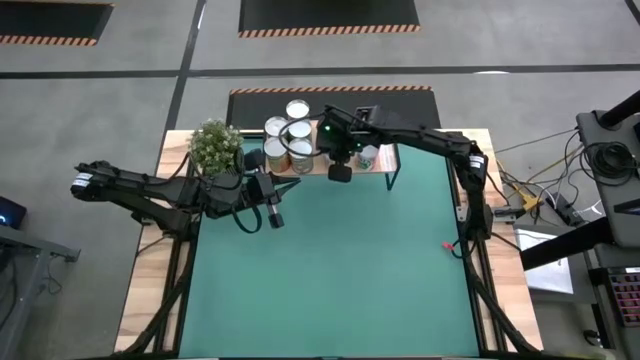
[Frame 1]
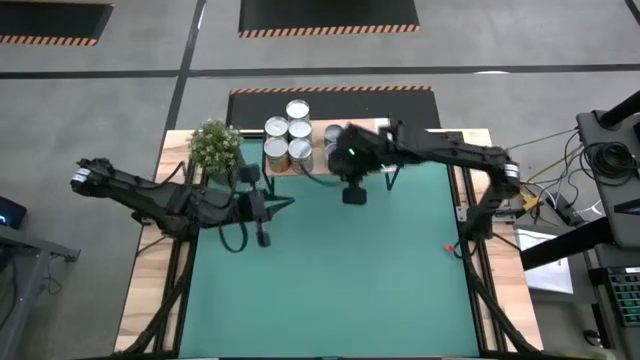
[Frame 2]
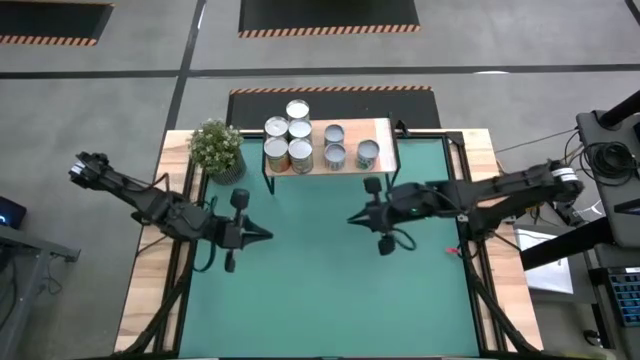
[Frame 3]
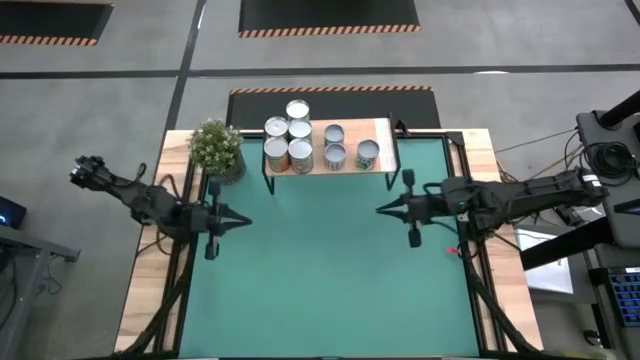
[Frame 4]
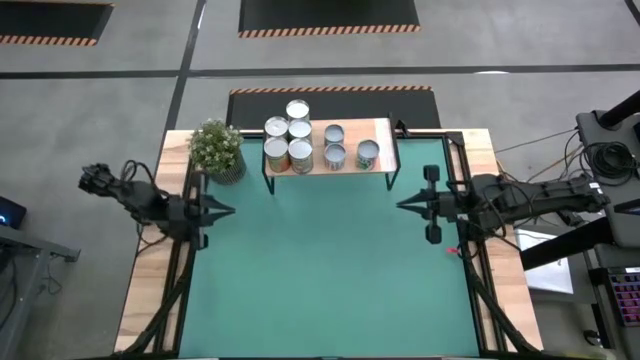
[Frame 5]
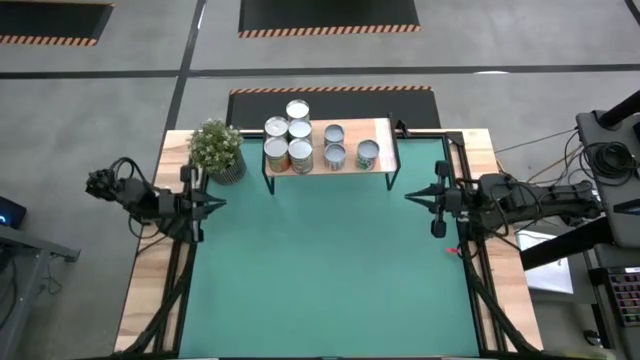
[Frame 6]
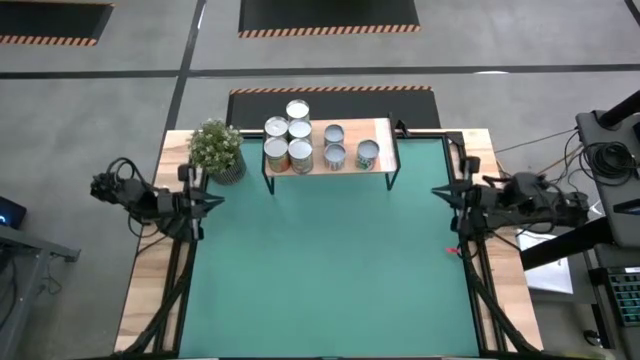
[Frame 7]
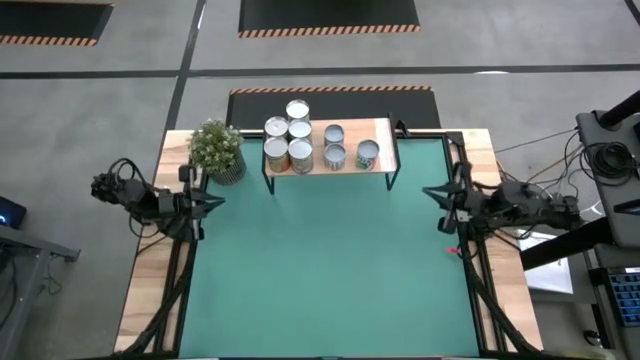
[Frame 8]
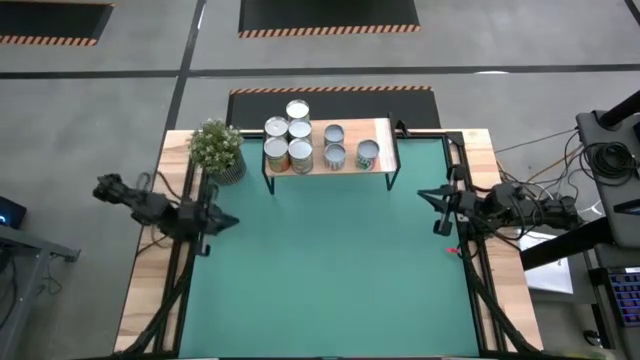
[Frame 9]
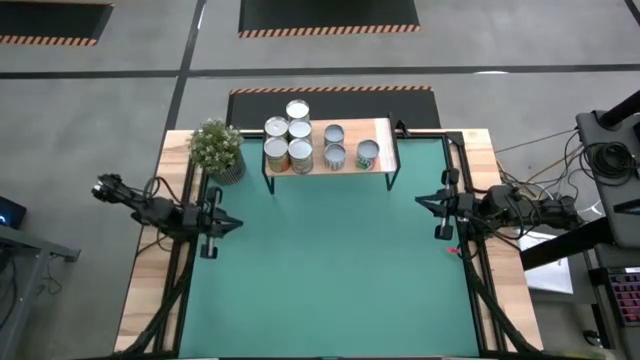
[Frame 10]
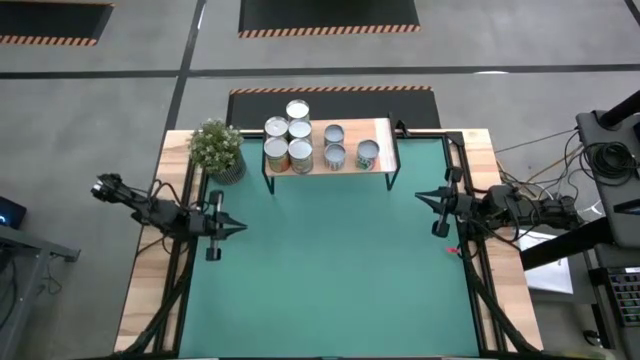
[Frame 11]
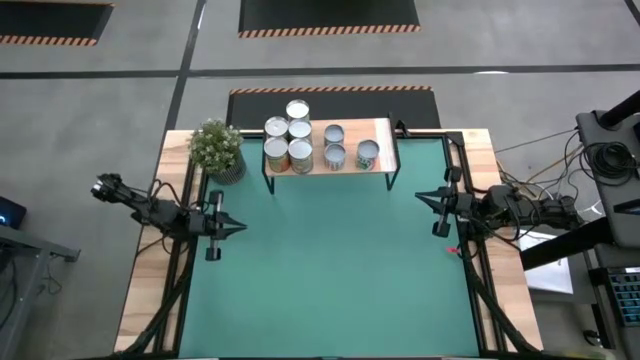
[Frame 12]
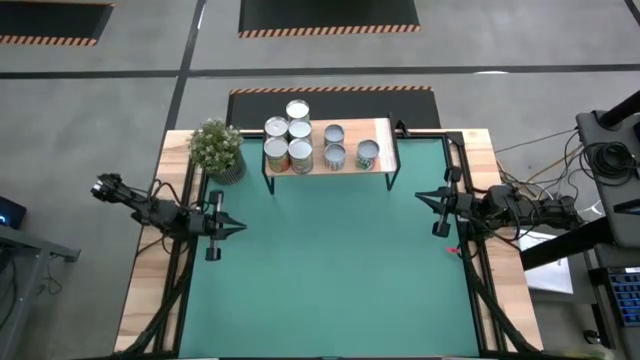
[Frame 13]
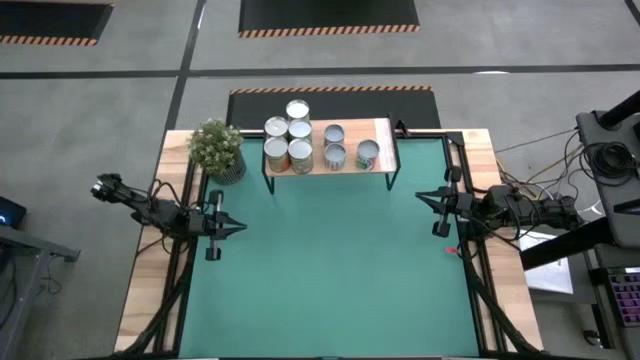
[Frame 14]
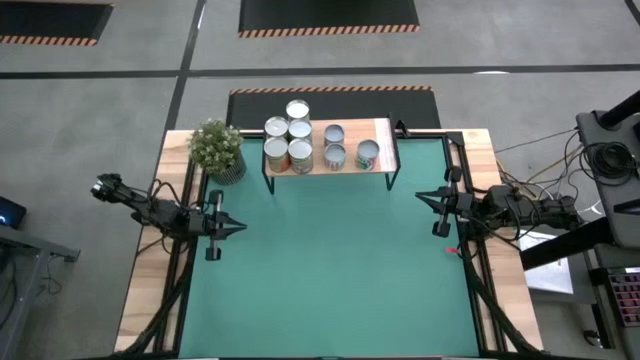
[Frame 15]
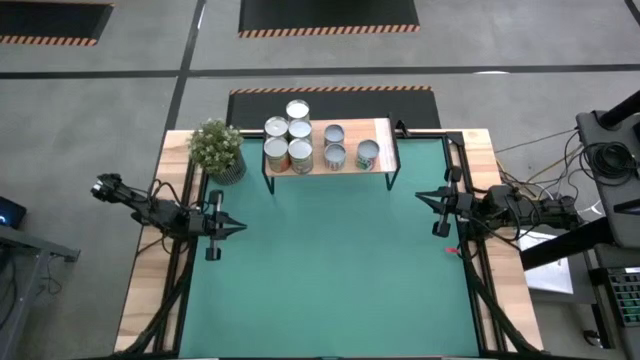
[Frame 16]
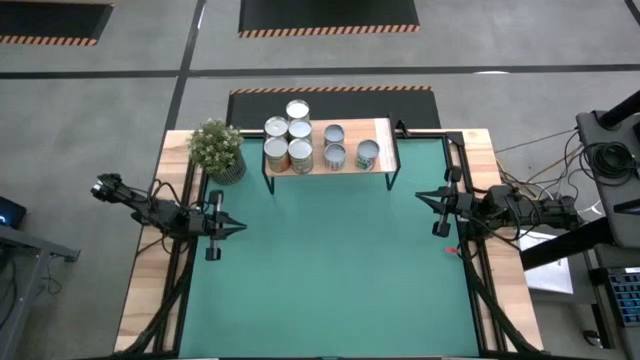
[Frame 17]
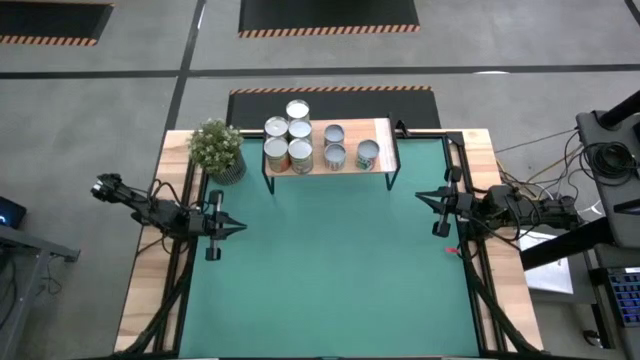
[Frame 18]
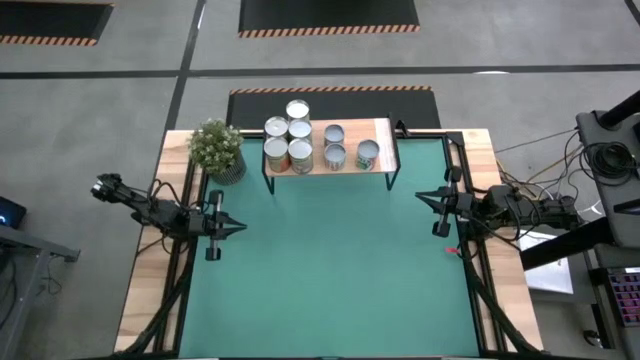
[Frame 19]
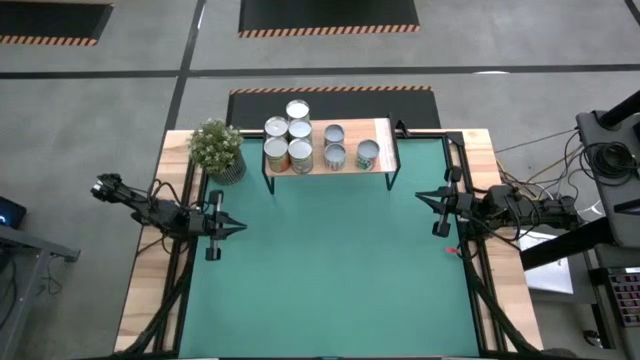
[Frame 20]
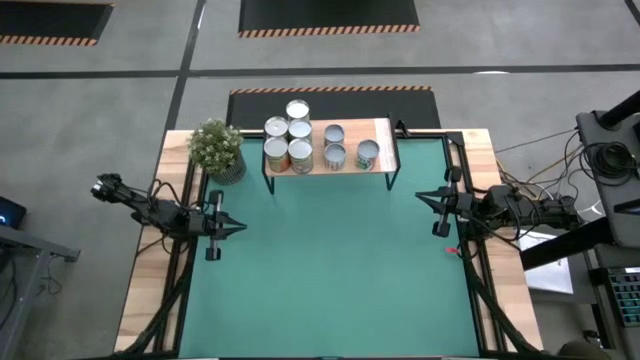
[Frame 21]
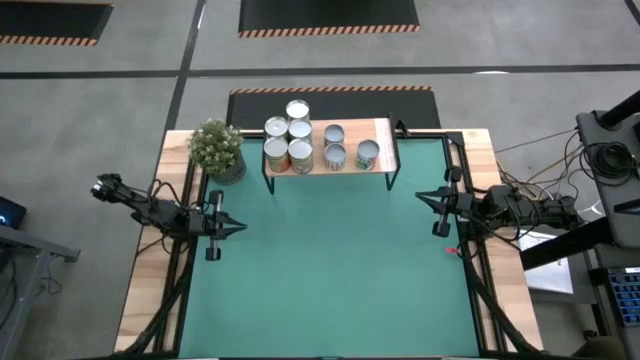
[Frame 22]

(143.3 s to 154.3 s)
Task: Pick and place cans onto a shelf
Return to Home Position

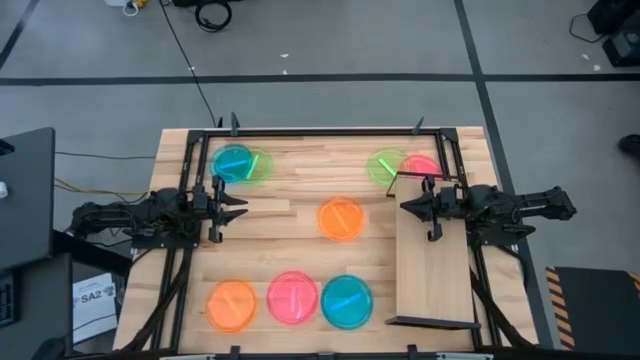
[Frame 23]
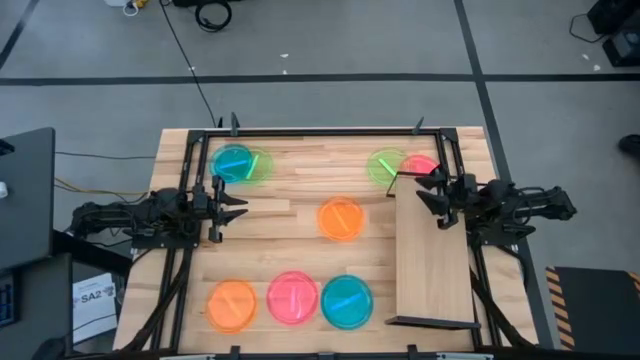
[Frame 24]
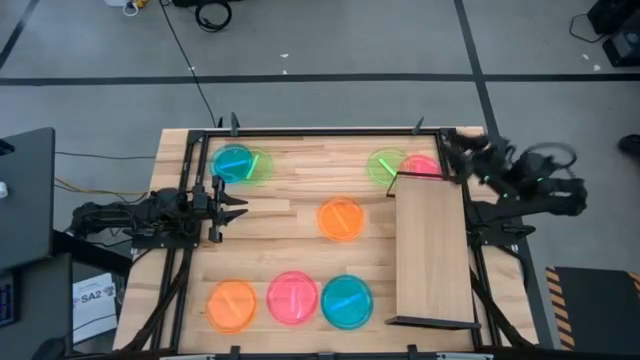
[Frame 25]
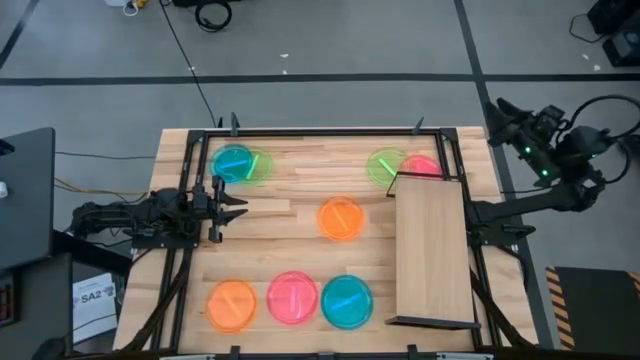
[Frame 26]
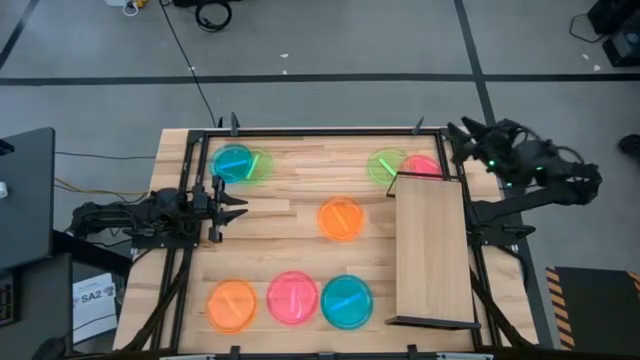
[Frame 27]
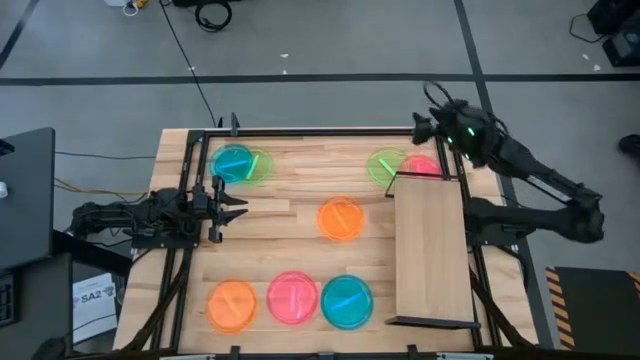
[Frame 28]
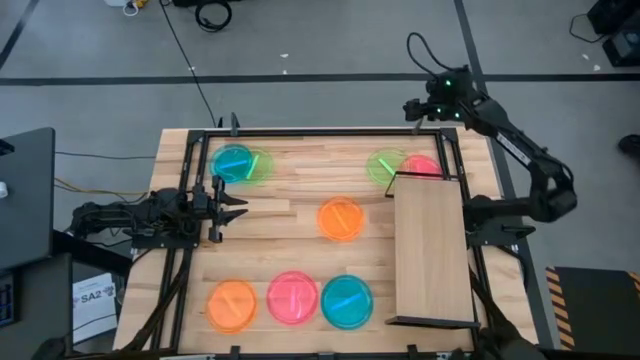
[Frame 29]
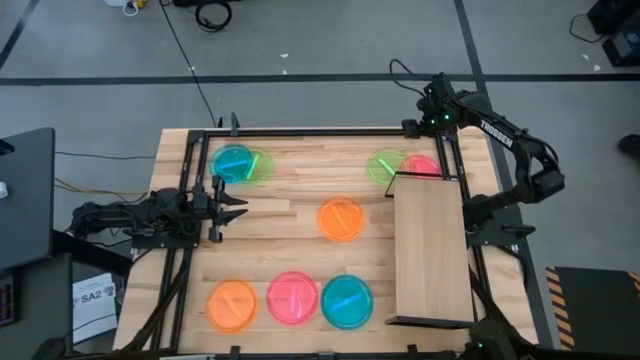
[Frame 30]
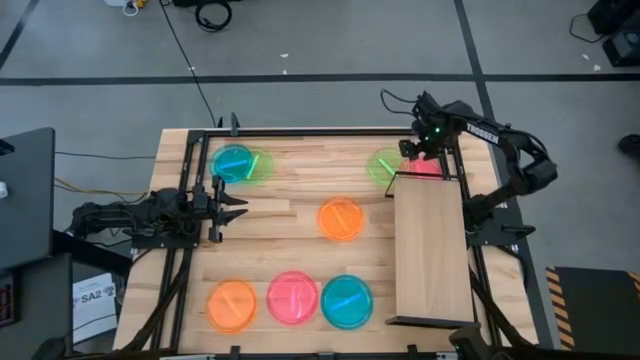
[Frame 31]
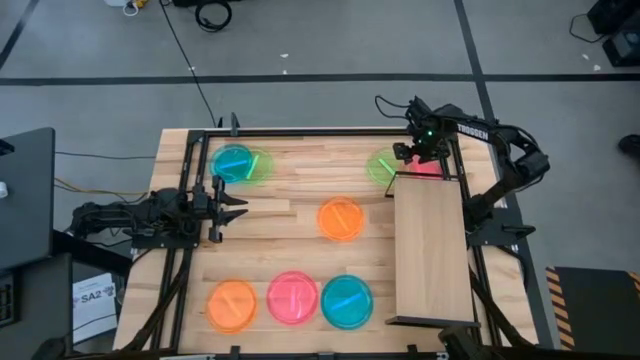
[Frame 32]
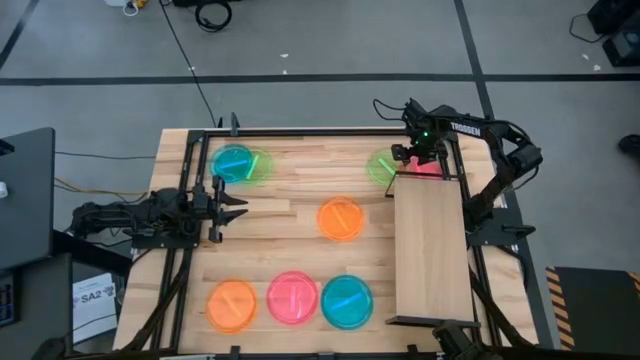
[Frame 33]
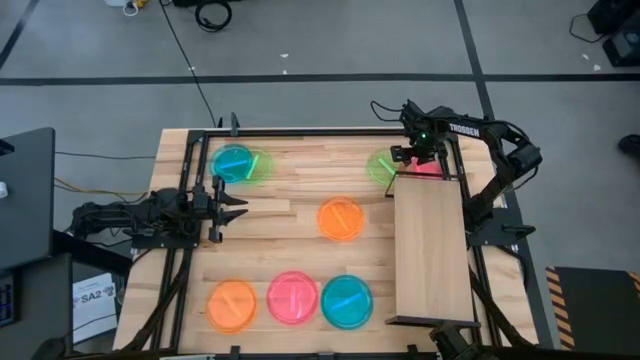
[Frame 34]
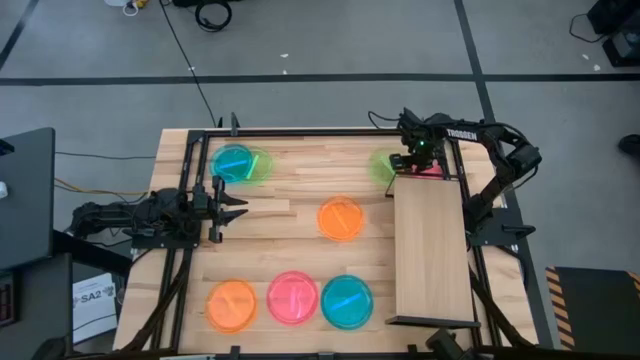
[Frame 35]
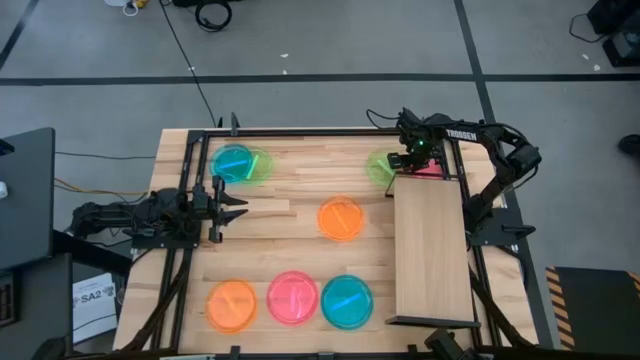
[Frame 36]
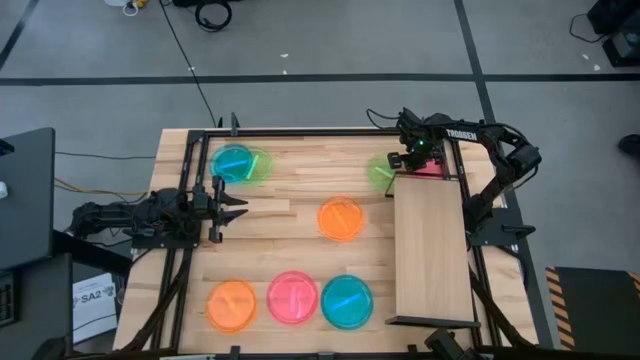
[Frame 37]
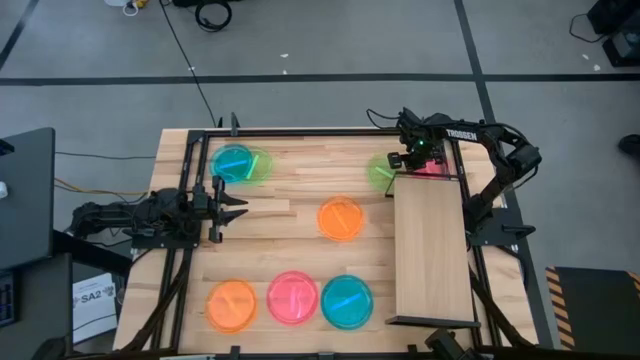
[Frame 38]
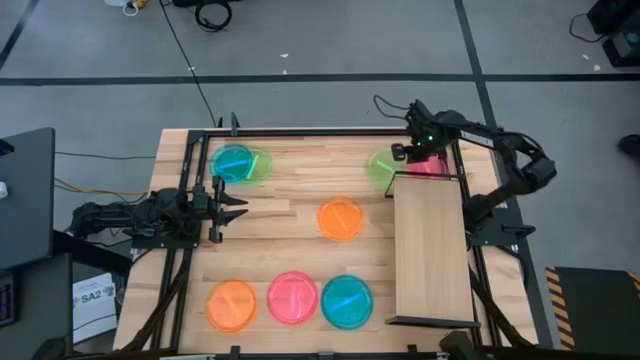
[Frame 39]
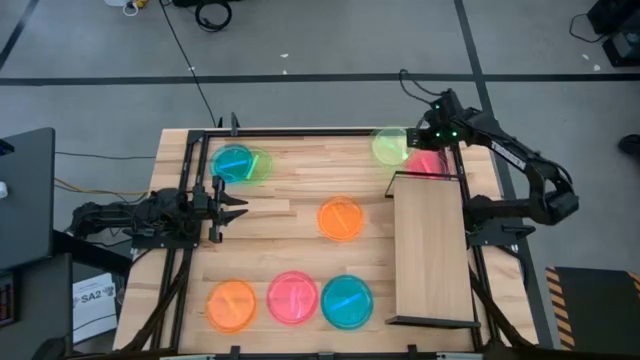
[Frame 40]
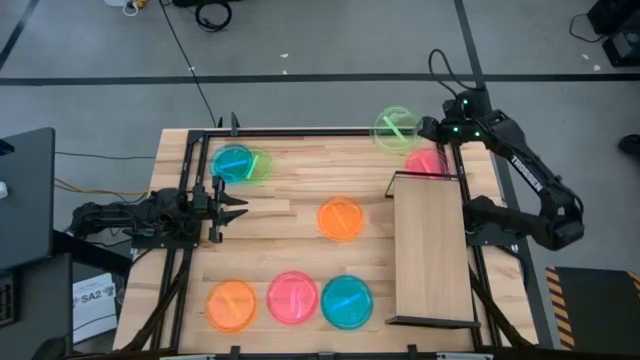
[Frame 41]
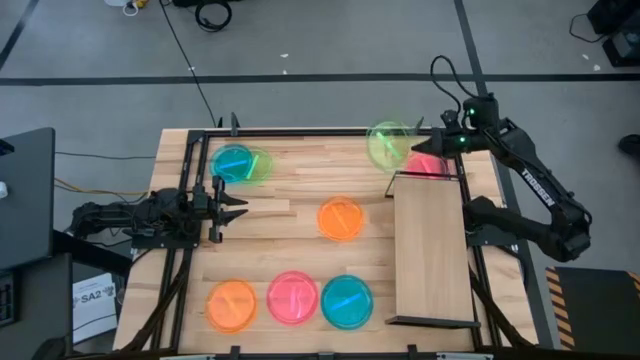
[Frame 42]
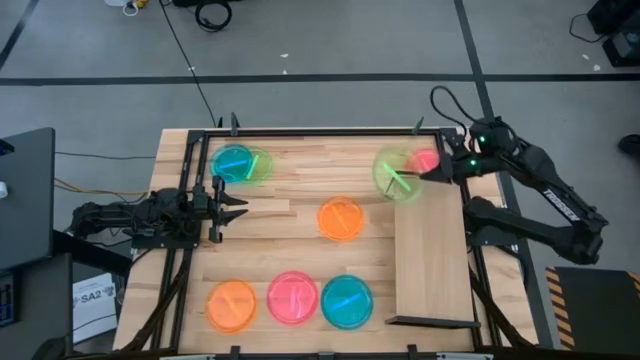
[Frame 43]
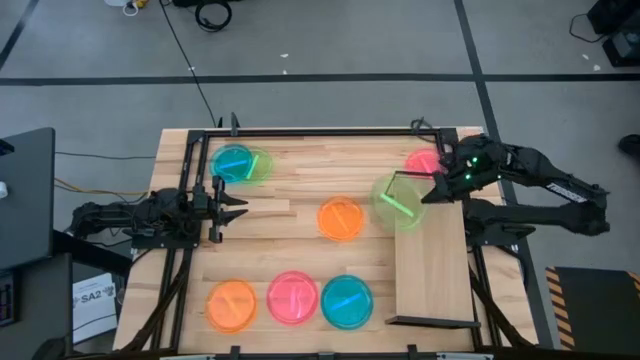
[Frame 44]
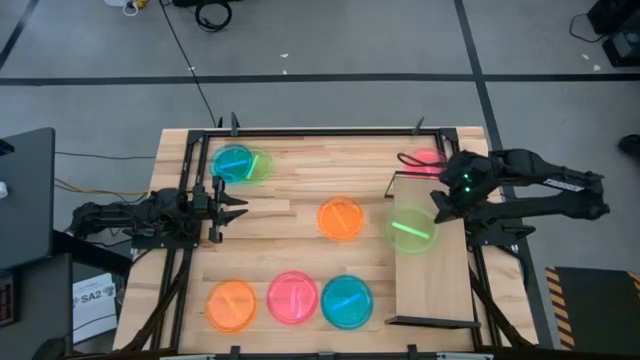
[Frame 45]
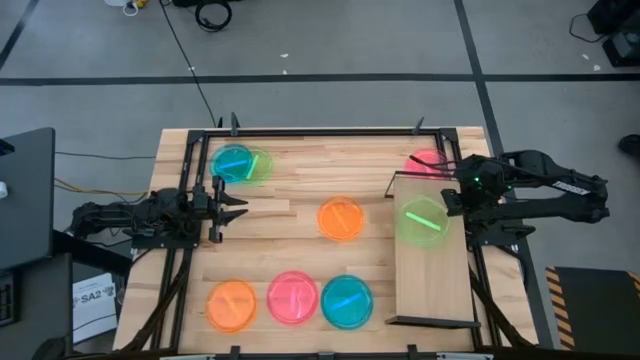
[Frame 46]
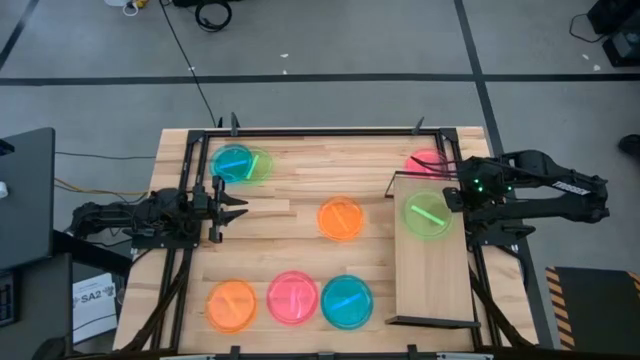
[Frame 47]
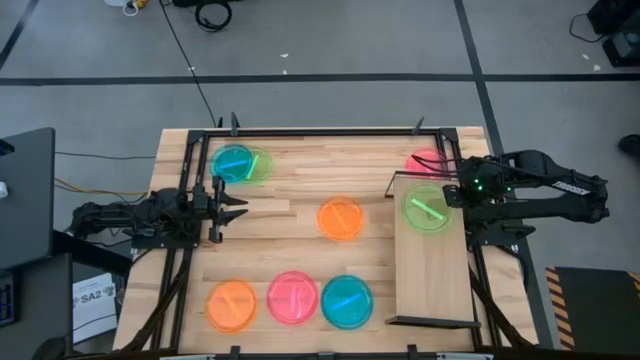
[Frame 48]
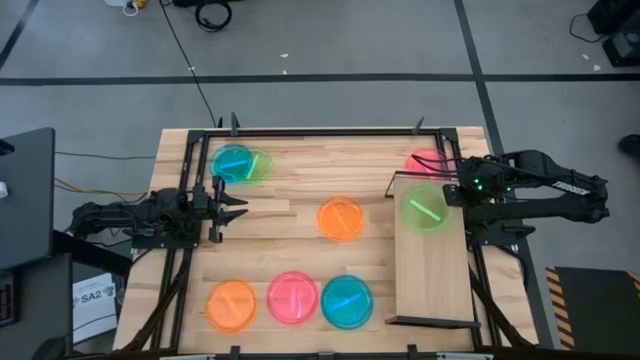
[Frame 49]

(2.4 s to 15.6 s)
Task: Place and stack plates onto a shelf
Put the right green transparent plate on the shelf
